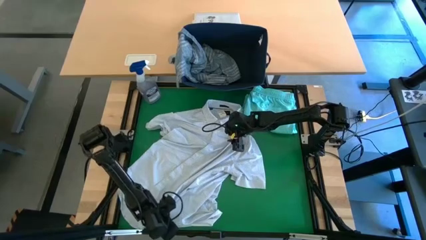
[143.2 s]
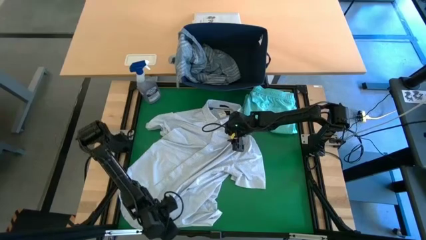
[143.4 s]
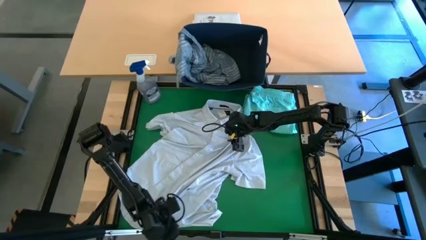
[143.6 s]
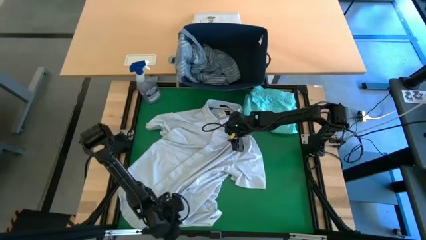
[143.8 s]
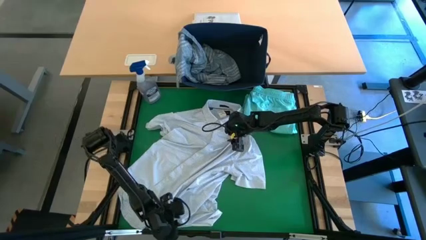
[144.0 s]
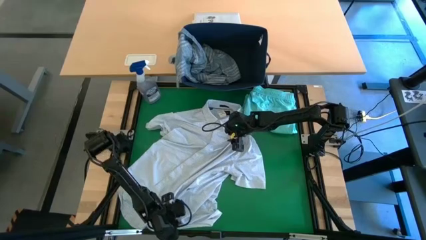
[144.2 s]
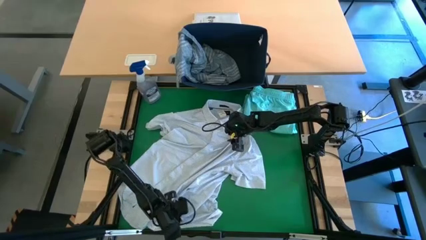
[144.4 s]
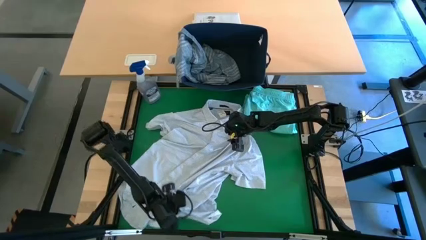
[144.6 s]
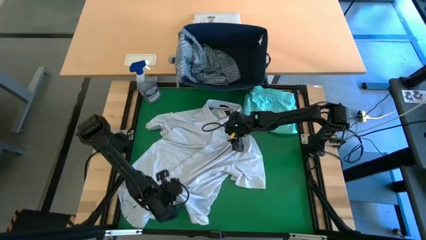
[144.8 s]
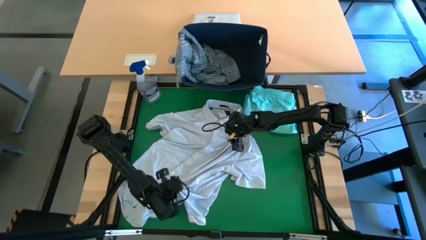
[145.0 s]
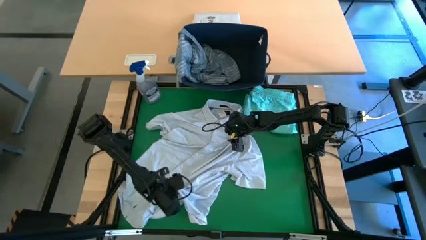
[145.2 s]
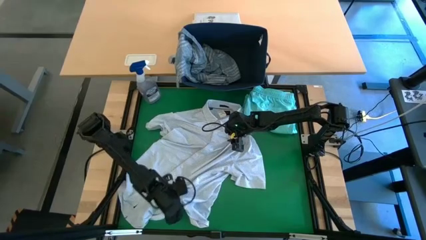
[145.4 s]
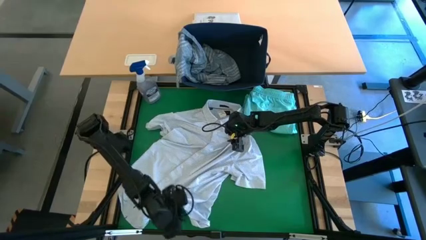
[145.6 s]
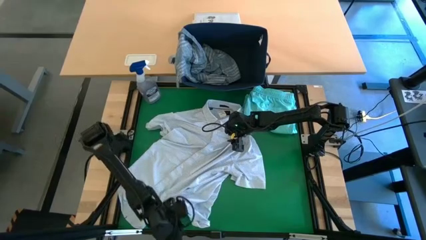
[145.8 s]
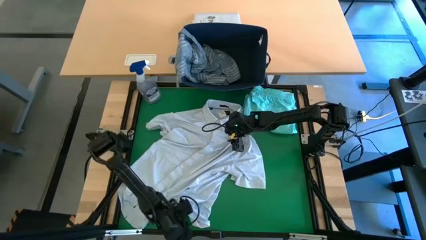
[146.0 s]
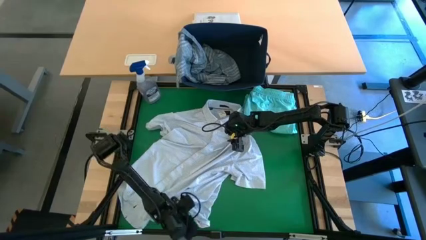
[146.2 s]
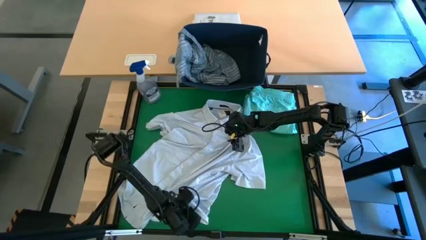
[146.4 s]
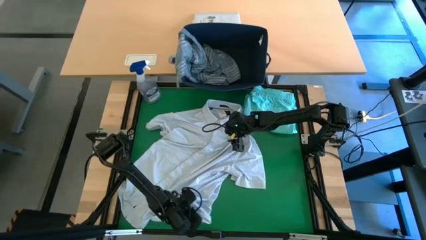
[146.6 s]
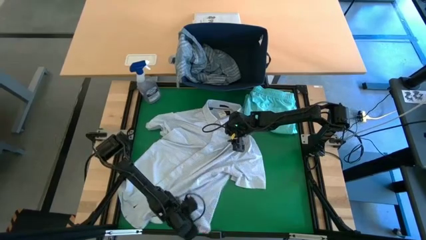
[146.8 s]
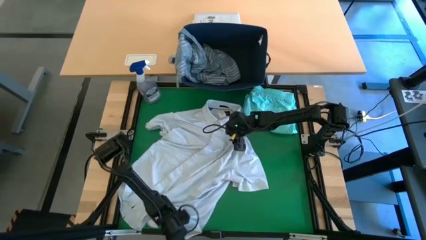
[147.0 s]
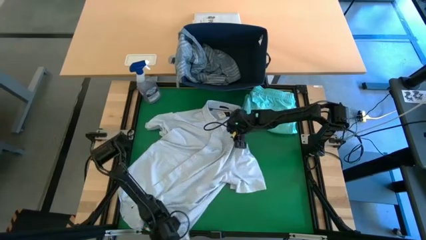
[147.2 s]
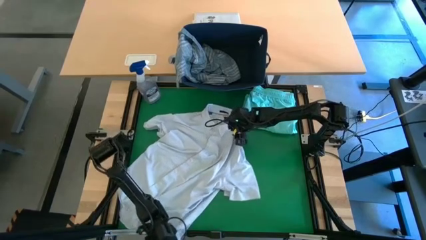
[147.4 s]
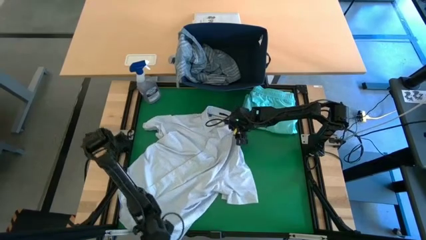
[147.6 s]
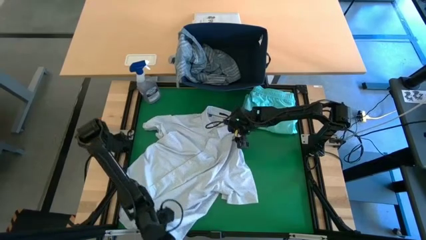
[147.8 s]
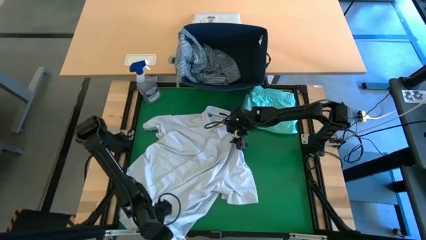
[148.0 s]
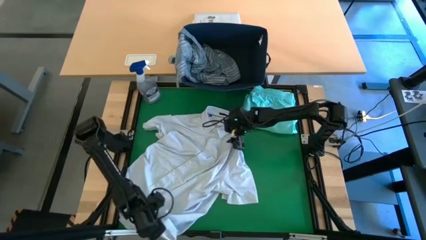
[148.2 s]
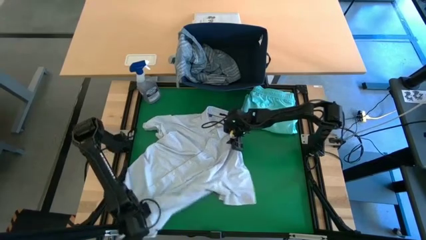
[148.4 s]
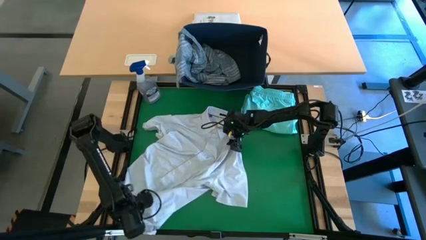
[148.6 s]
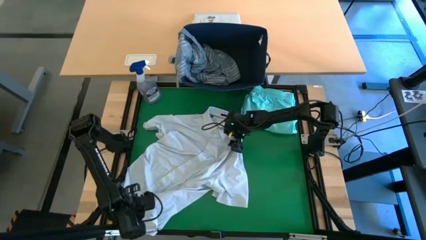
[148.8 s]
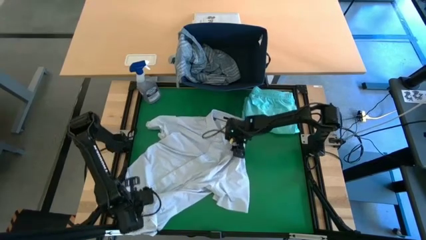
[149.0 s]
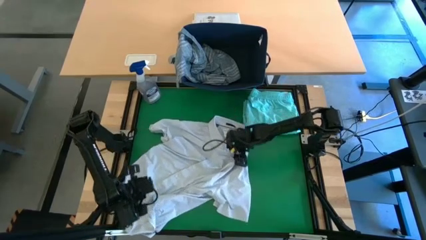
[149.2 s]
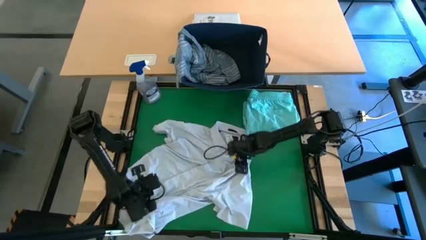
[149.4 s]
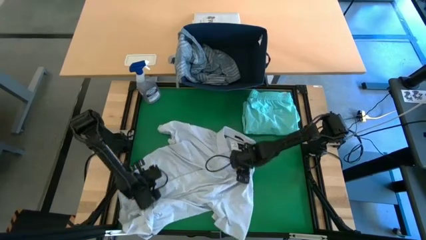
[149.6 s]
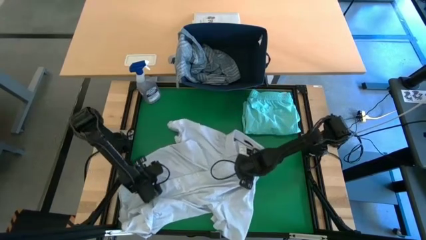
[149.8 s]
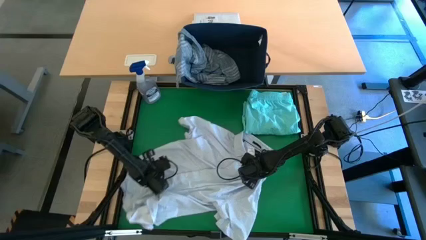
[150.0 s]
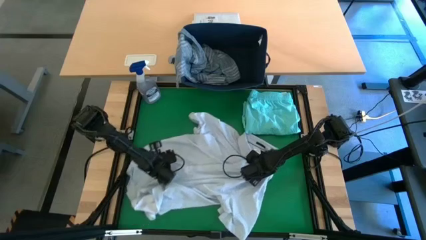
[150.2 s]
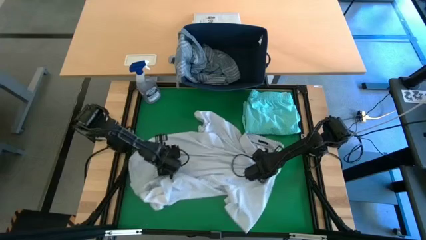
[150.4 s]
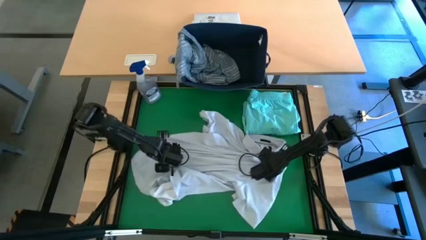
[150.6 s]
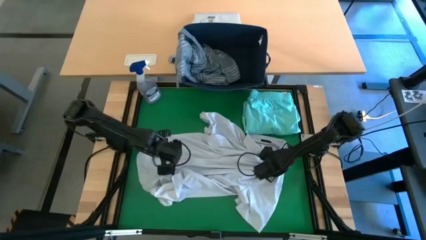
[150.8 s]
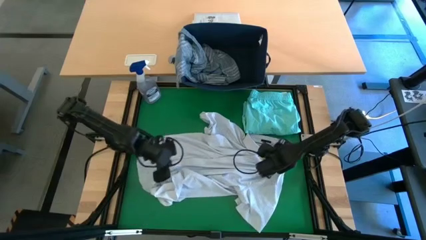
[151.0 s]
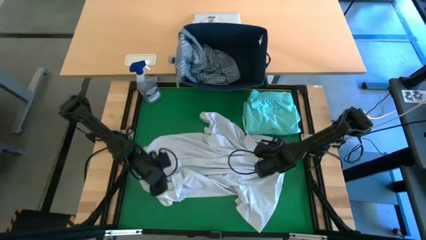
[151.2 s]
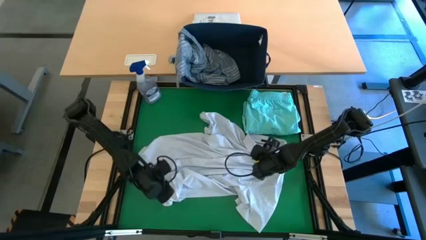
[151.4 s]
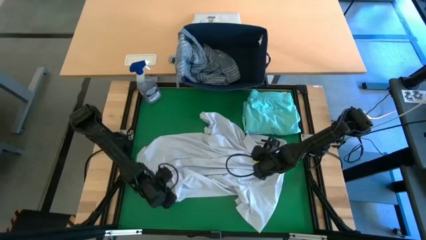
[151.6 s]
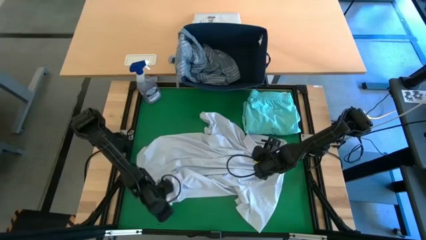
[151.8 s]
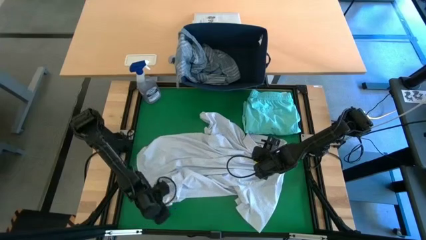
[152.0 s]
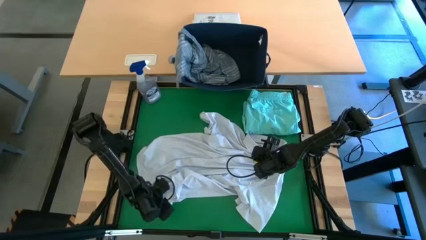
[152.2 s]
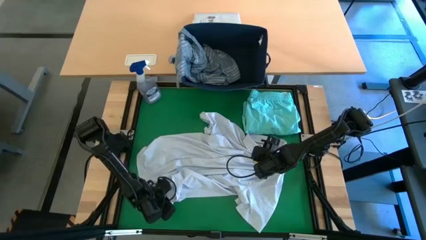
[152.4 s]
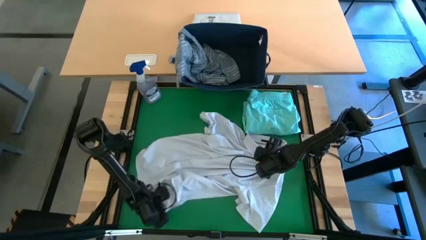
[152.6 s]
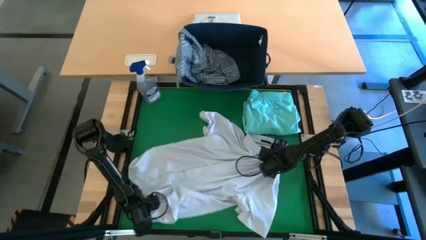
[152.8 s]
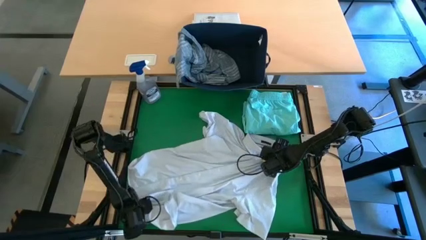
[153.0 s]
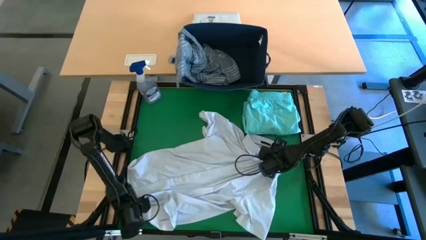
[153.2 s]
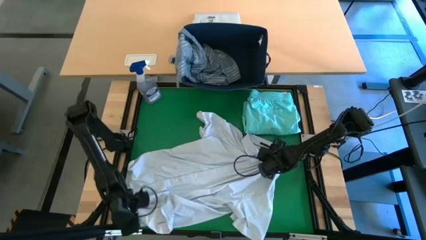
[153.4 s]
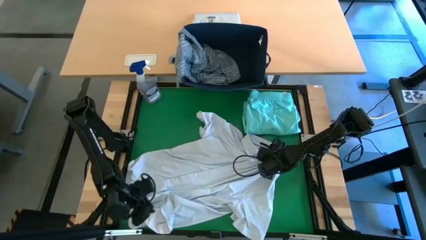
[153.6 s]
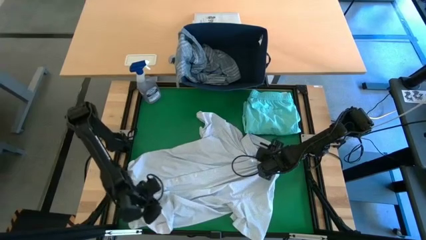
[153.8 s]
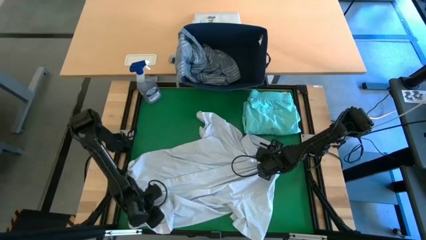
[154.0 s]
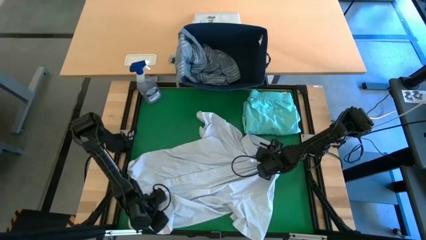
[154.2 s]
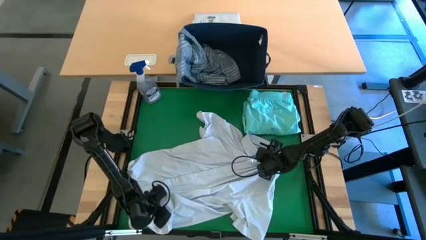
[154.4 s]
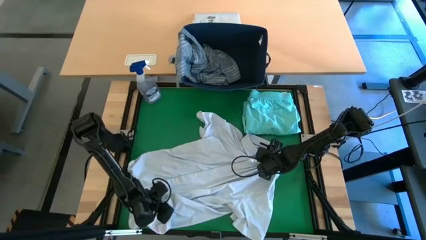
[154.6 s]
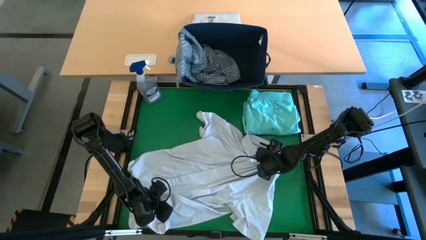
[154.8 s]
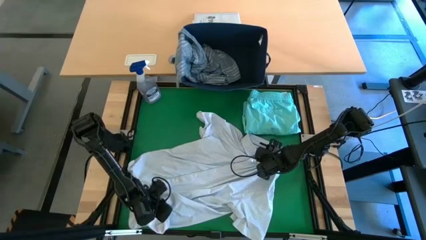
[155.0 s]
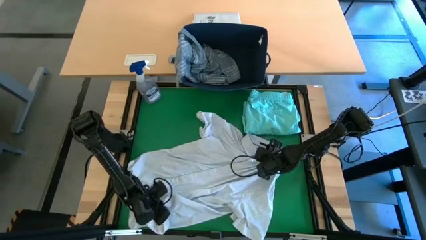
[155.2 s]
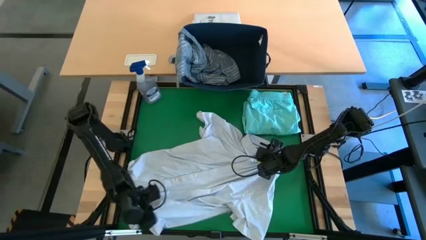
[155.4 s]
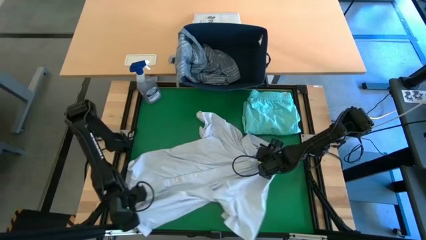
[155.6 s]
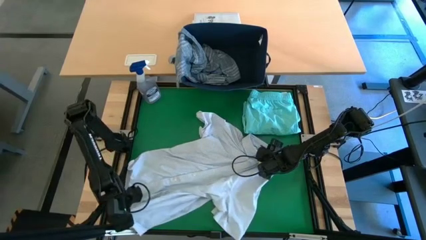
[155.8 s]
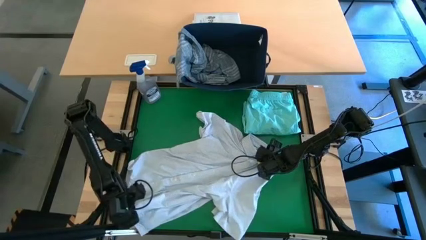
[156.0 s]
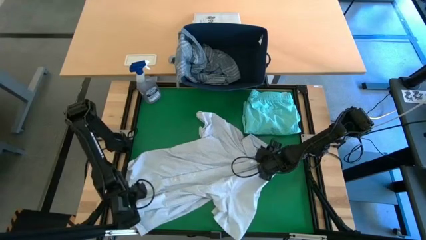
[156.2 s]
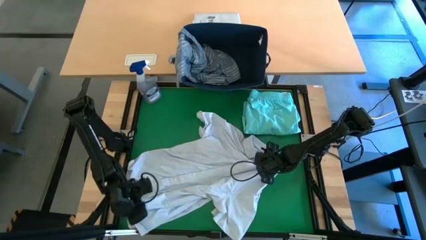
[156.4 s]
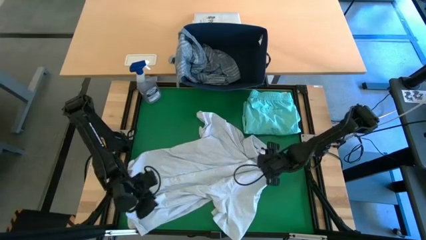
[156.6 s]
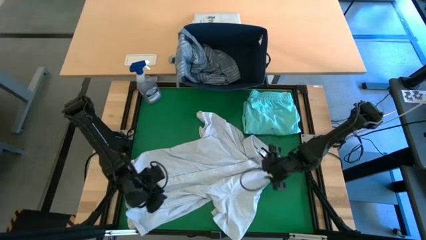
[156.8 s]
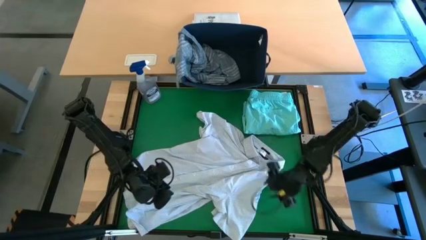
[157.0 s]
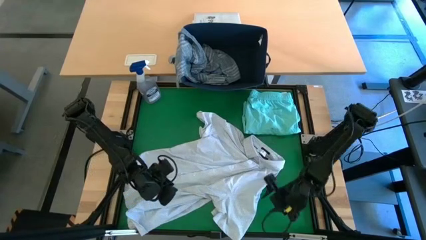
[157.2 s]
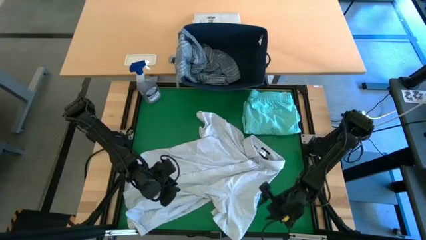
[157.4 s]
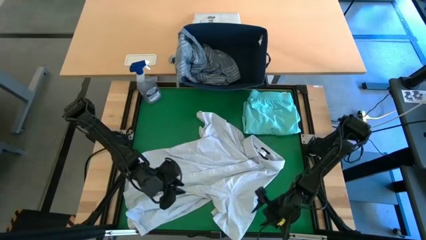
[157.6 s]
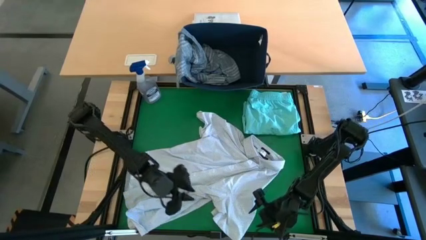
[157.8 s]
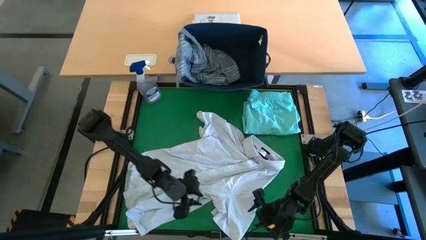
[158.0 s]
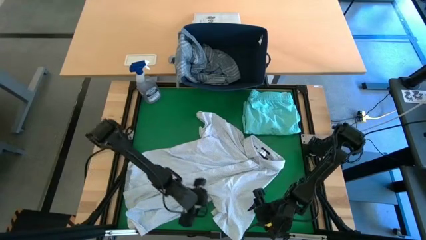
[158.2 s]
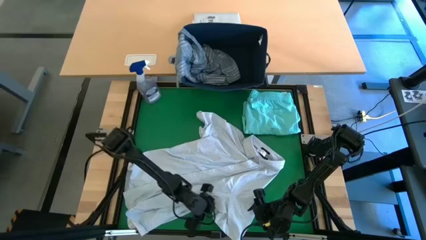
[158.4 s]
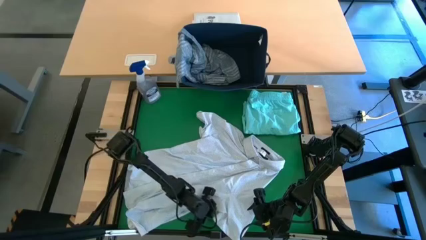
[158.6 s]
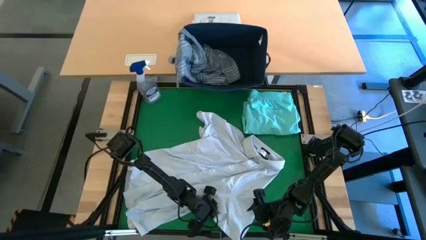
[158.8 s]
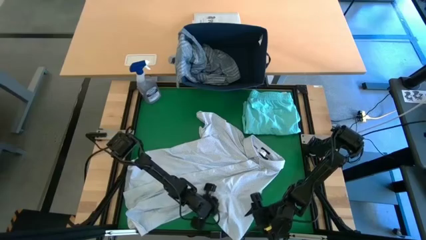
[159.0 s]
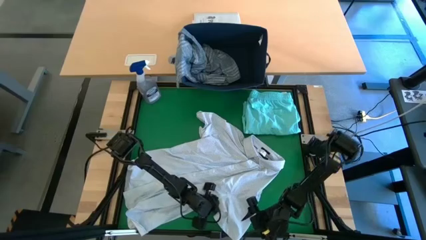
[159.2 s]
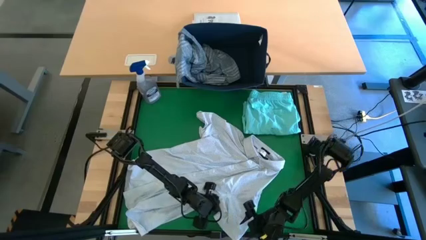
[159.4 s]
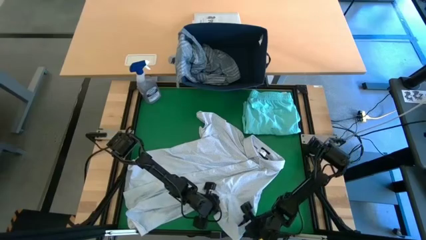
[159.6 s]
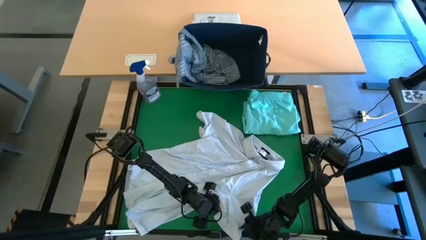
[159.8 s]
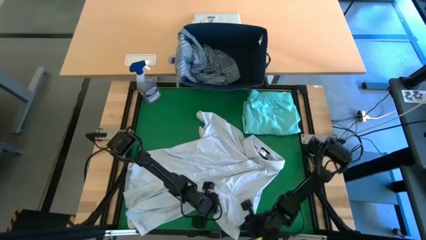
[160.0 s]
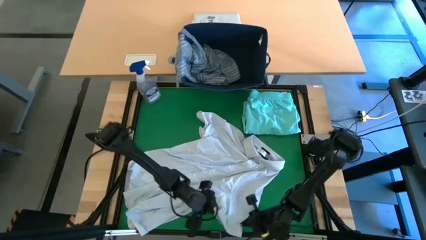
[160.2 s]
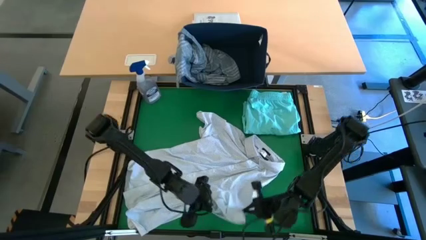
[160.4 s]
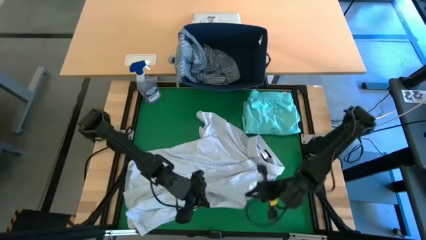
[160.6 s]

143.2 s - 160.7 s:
Task: Fold laundry
Fold the white polo shirt
